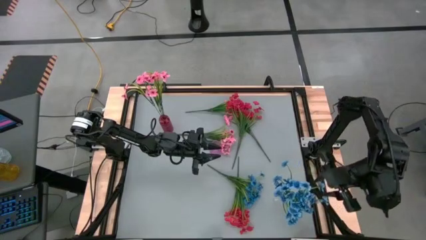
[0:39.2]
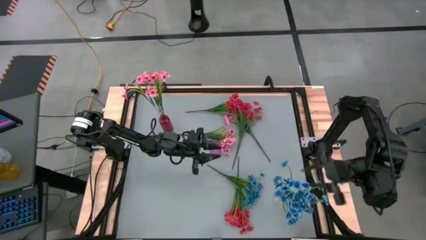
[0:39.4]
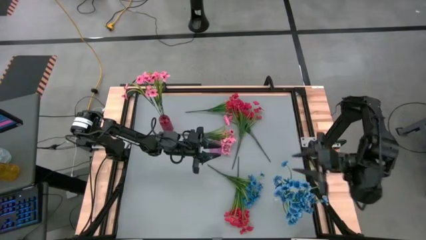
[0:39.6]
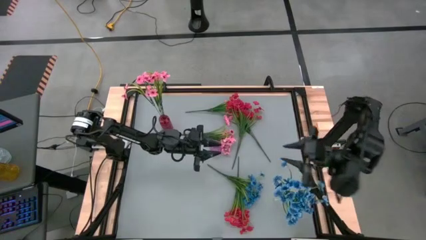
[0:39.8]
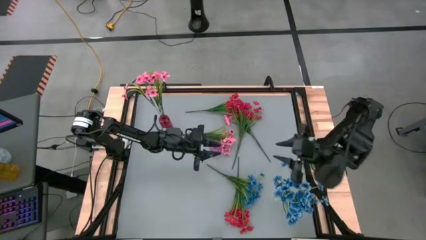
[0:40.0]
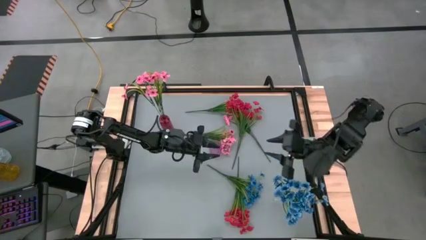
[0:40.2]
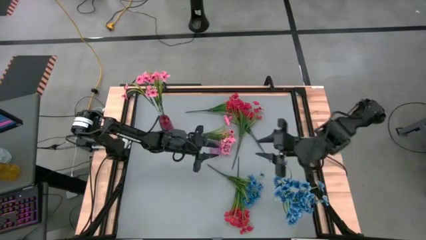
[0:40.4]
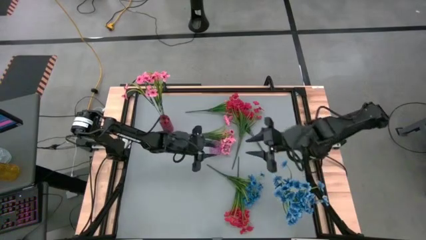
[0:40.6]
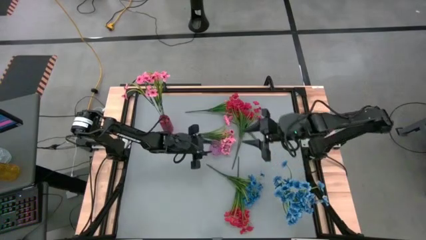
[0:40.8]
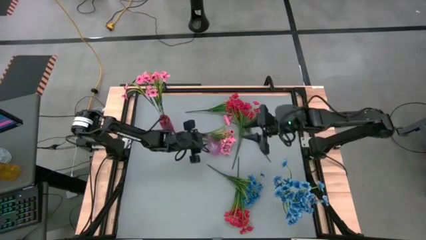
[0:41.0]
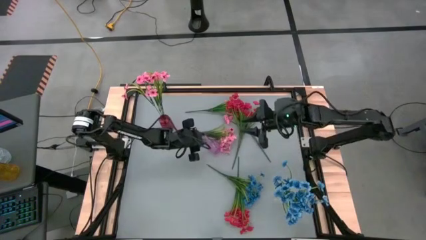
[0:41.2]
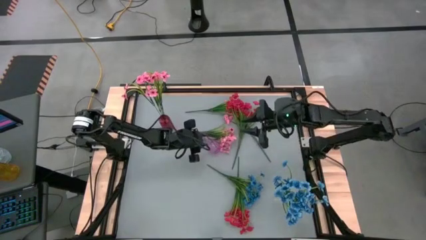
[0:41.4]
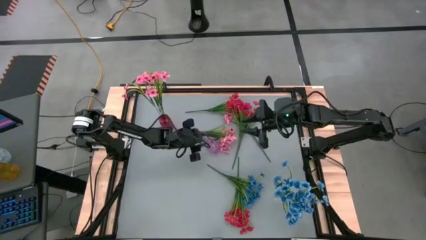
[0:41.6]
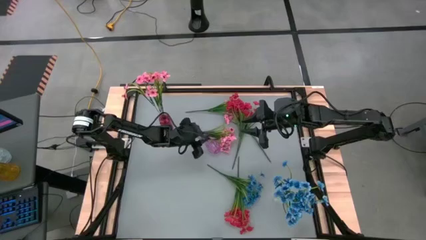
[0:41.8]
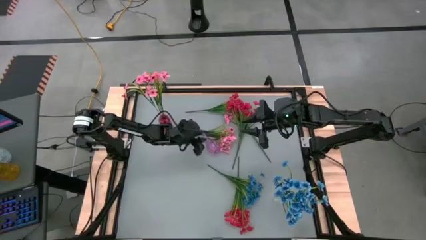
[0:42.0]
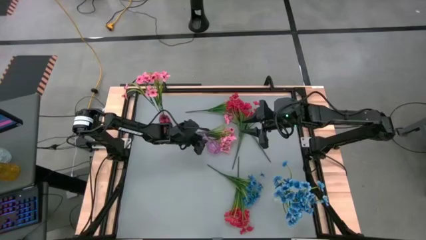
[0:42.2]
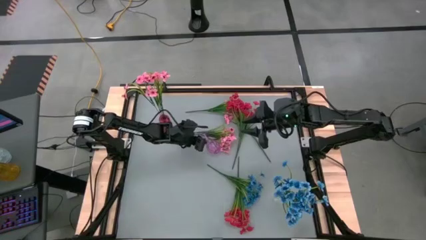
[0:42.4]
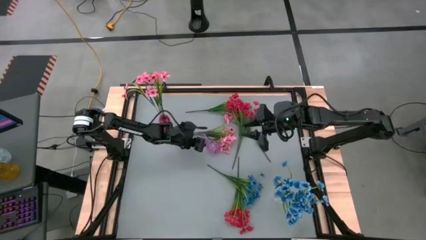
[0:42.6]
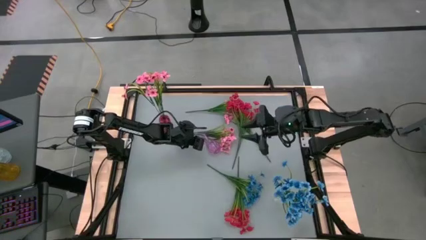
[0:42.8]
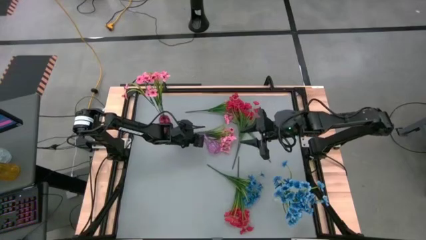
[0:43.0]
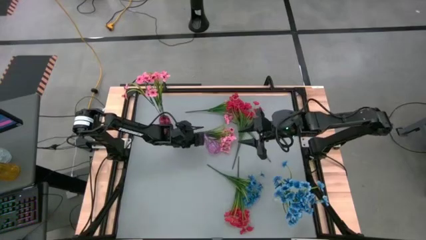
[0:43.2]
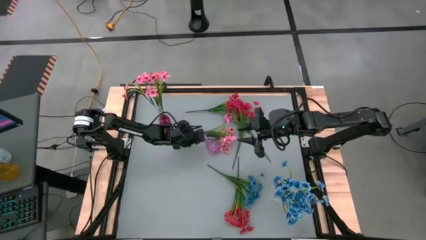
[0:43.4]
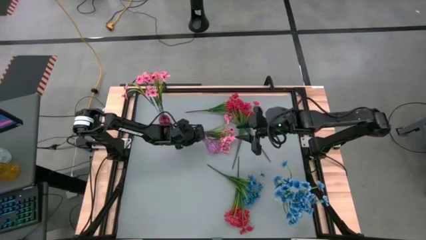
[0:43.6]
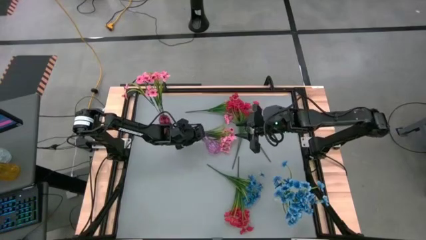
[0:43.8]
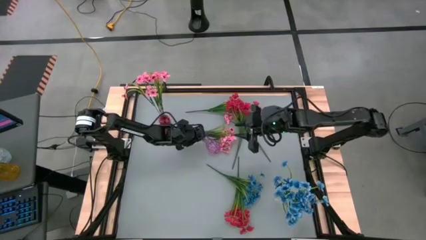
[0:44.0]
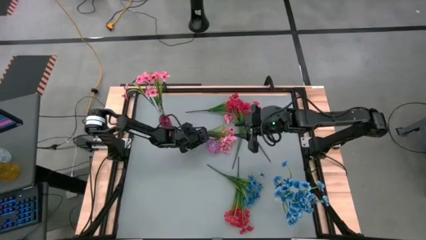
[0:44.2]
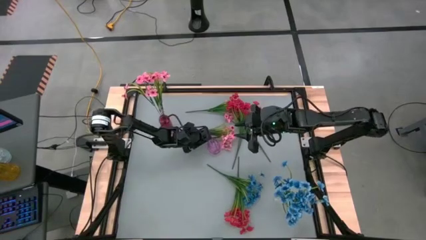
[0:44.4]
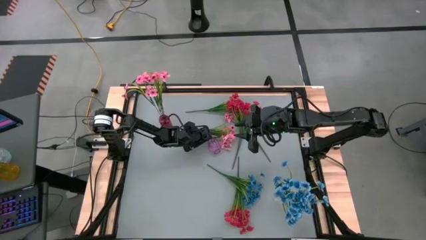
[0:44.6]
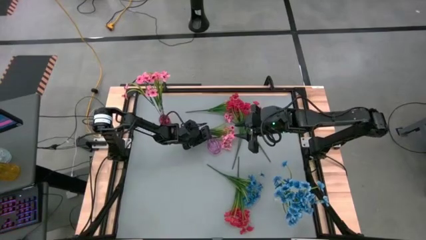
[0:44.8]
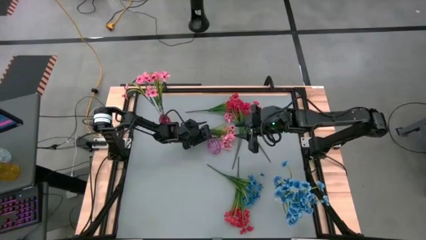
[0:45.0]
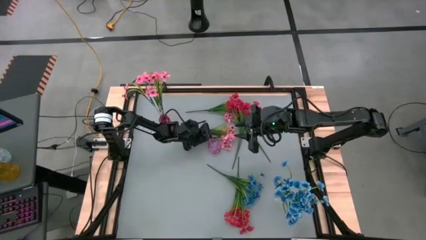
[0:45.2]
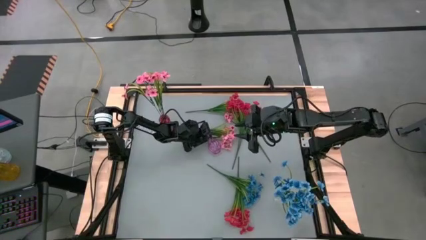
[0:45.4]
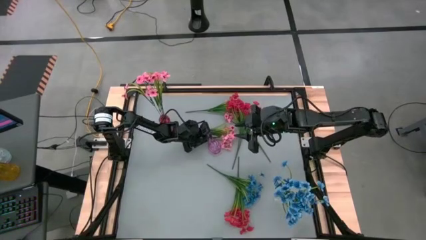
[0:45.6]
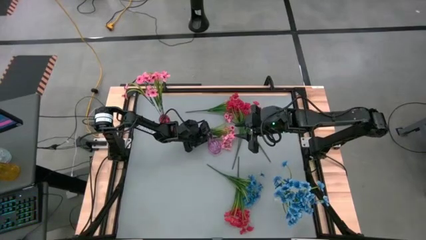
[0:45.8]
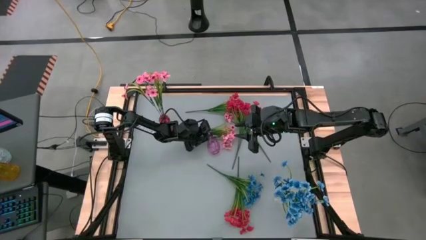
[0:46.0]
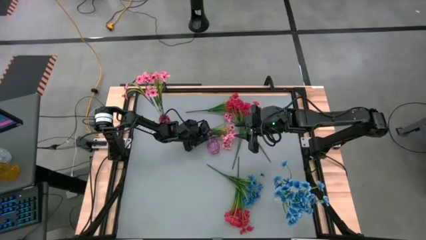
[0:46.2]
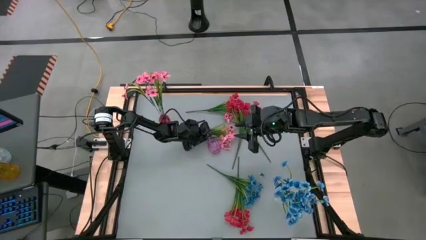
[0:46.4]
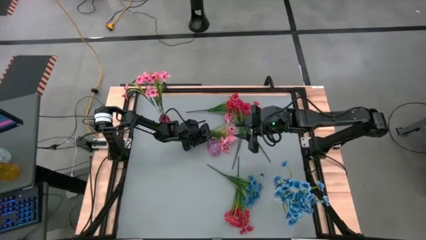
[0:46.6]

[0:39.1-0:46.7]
Task: Sort flowers into vase by color
Adjust the pink vase

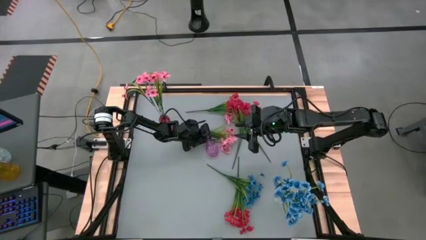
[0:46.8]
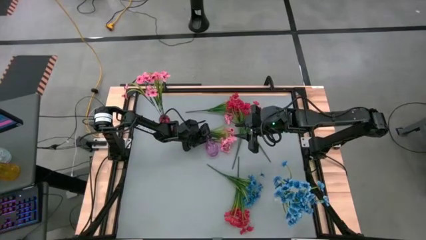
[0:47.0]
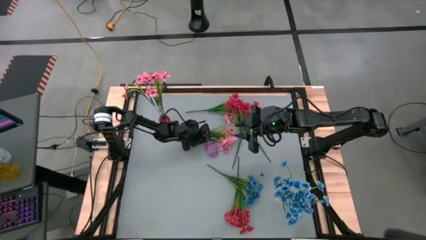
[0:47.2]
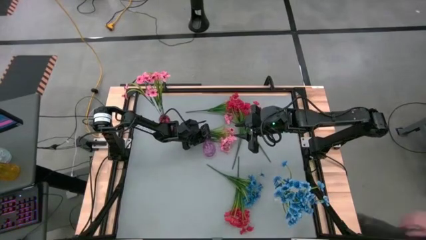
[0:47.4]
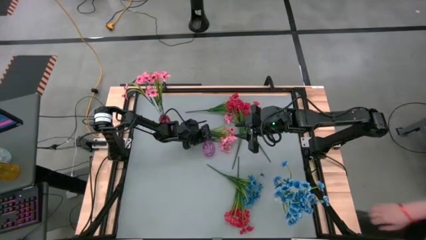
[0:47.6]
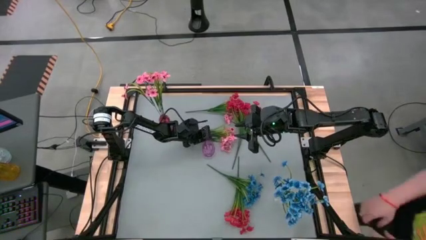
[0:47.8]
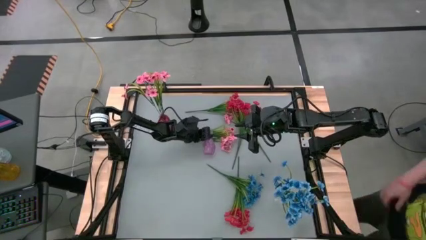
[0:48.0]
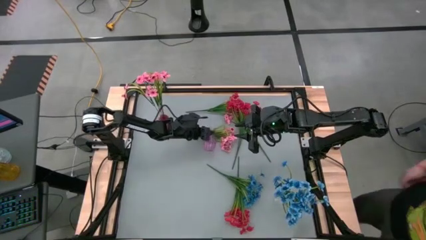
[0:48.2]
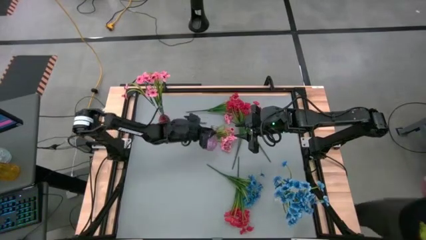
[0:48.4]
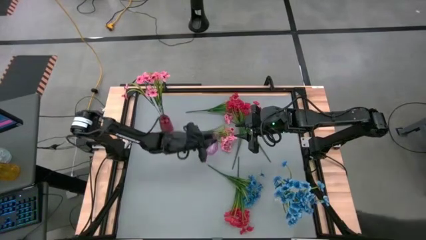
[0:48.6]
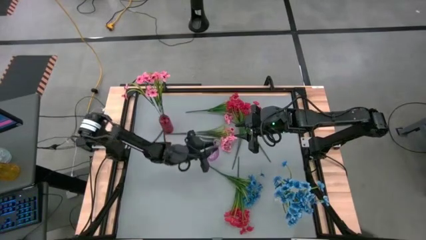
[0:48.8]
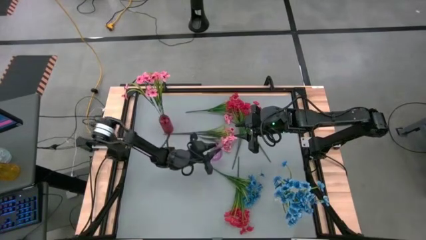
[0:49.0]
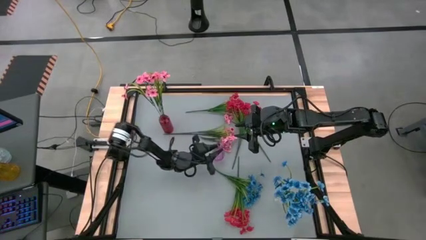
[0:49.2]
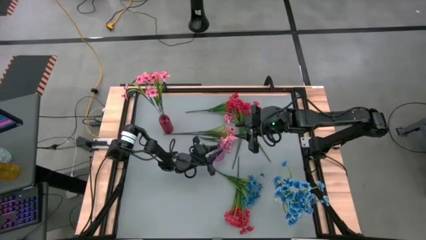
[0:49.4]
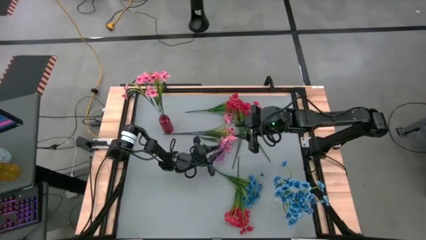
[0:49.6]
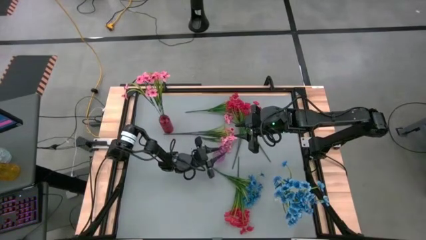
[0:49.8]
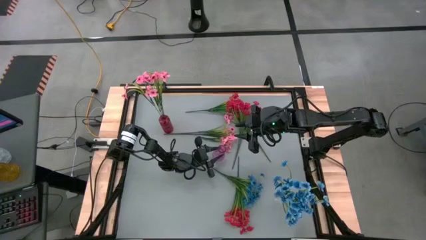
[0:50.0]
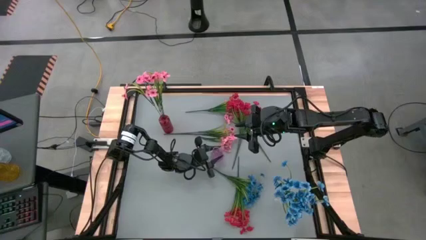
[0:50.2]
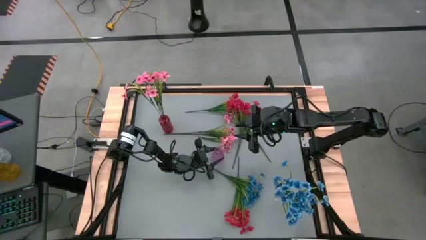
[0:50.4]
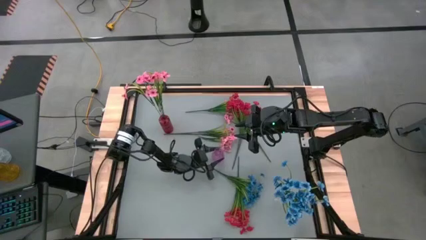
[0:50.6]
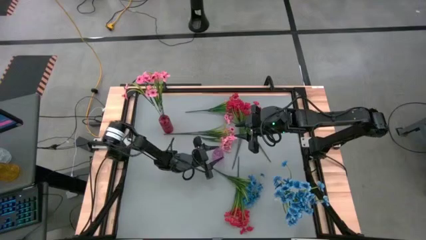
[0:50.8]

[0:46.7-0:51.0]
Adjust the purple vase
